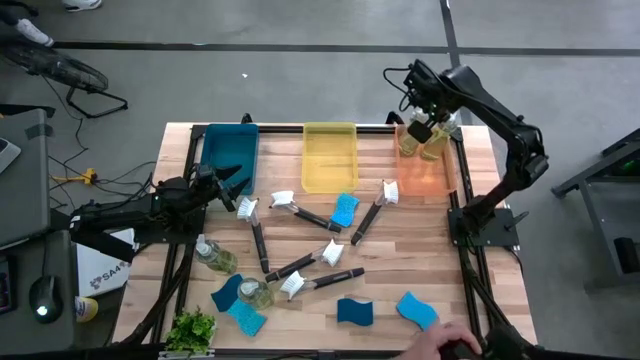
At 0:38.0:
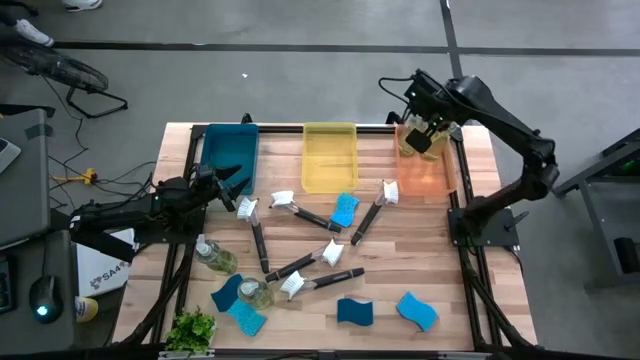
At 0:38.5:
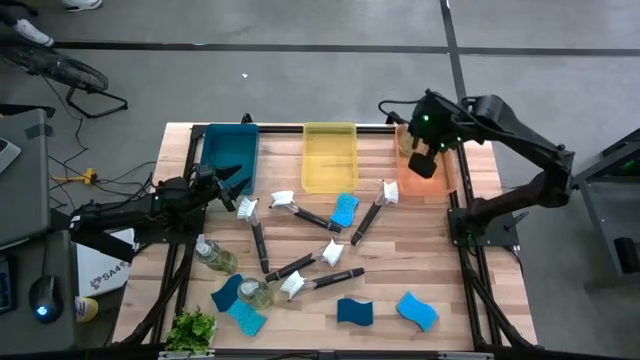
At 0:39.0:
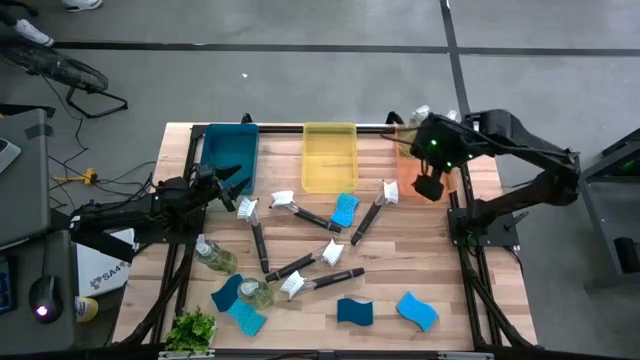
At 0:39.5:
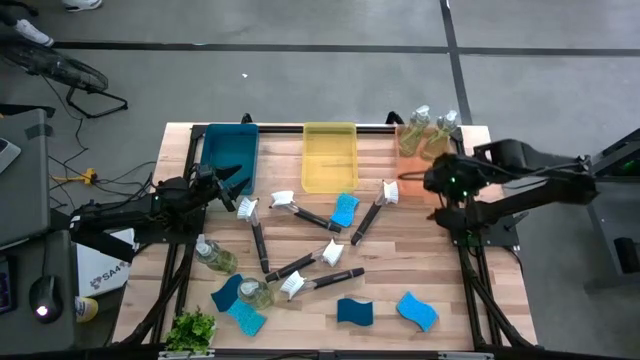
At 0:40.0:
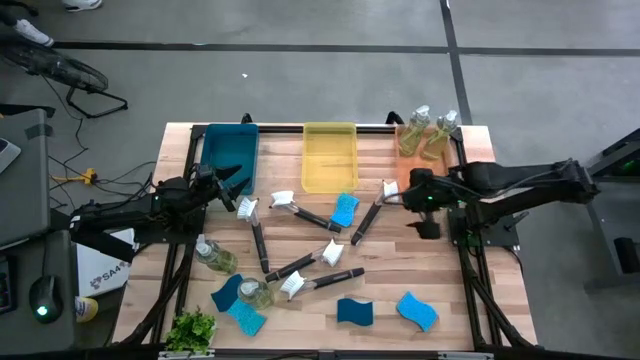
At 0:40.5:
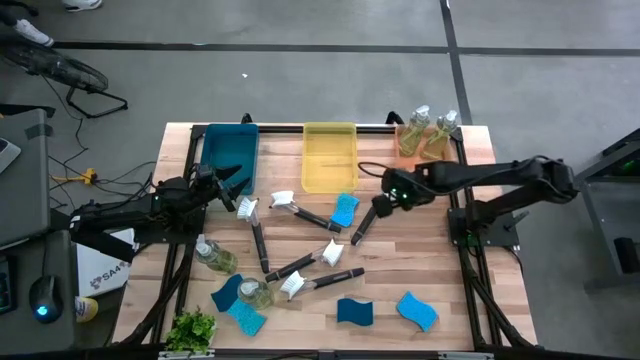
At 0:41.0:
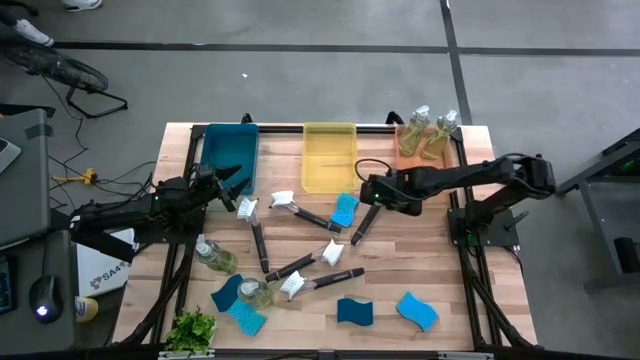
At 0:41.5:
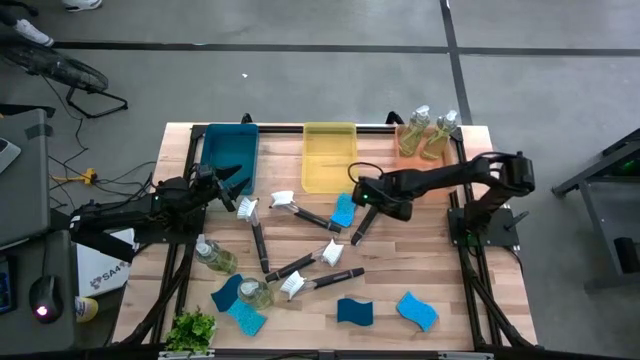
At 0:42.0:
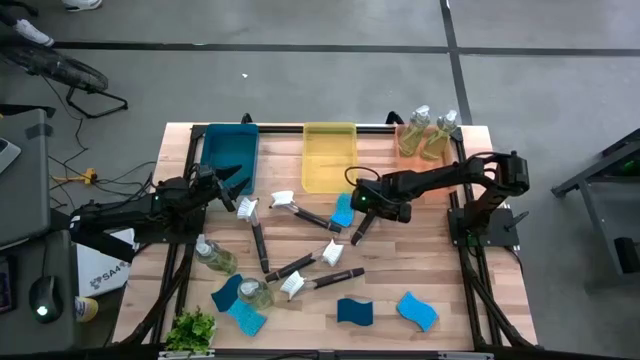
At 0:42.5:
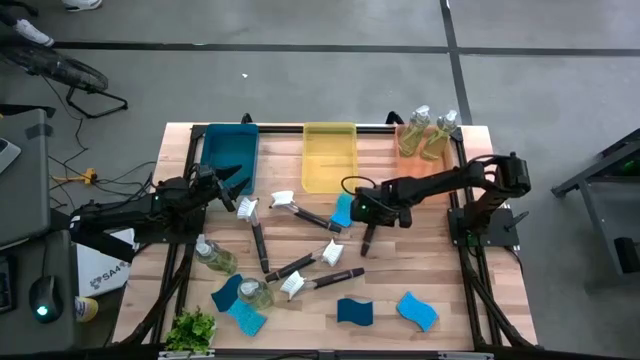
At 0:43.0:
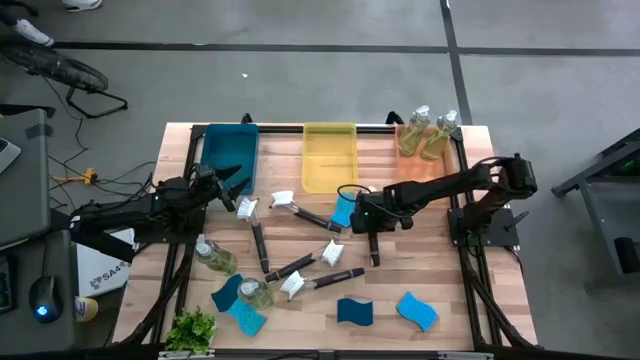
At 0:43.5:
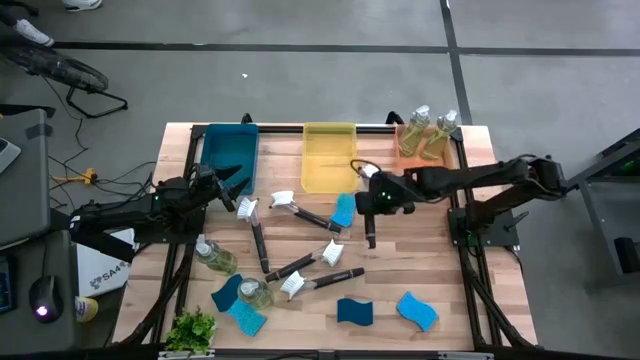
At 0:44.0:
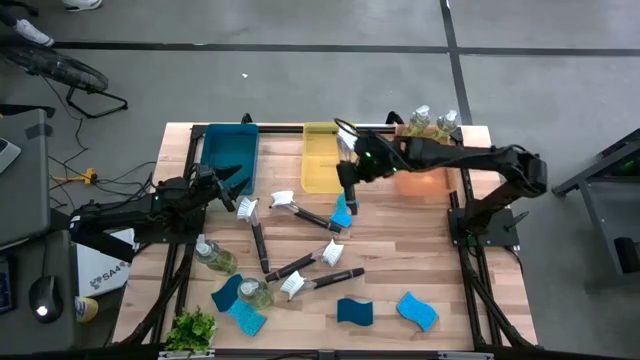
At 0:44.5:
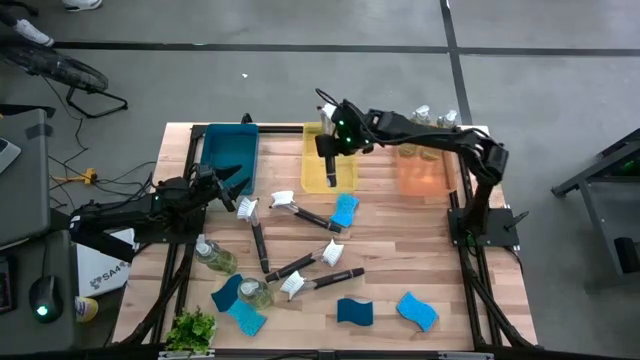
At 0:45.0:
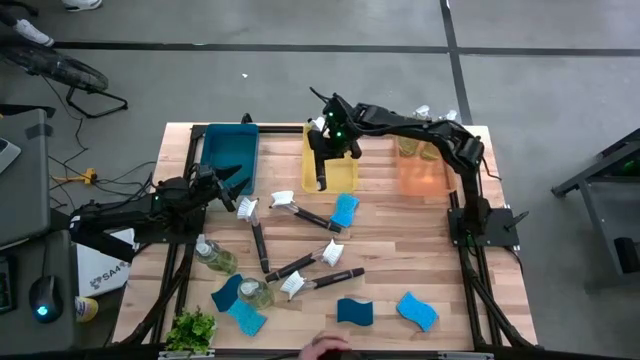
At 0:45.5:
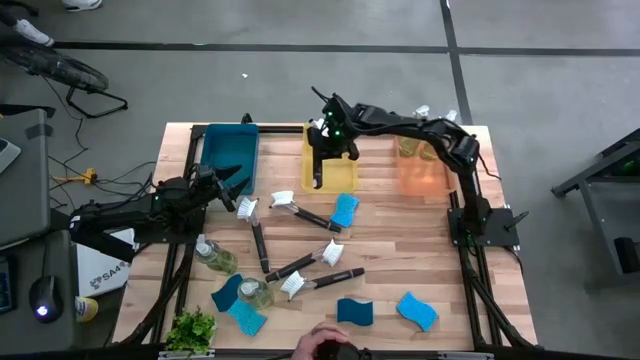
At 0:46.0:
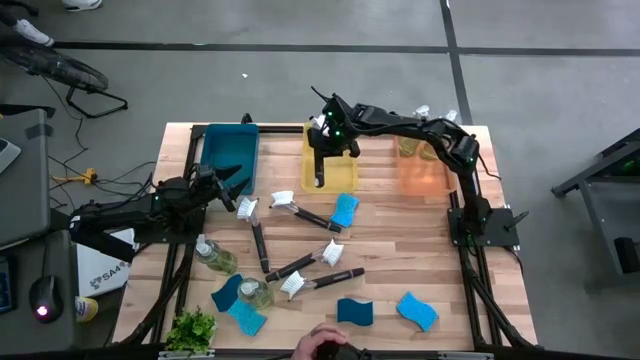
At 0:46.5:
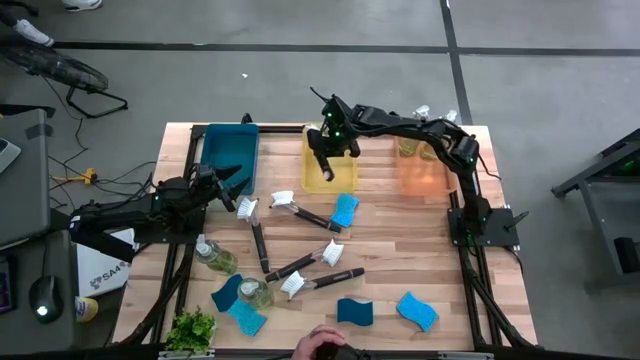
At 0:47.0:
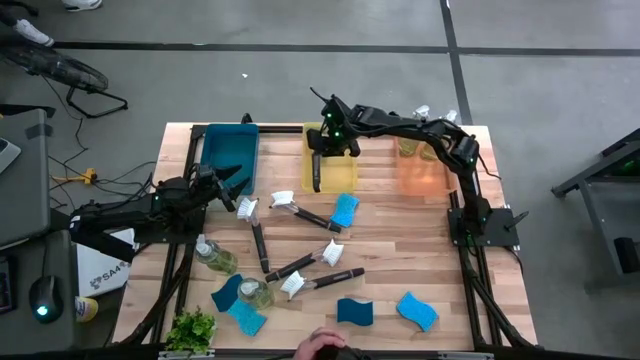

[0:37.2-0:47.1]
Task: Pick & Place Kitchen Sink Supplies
Put the black dishwashing brush into the yellow bin

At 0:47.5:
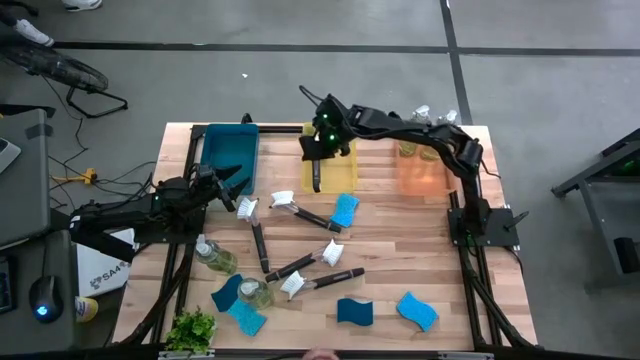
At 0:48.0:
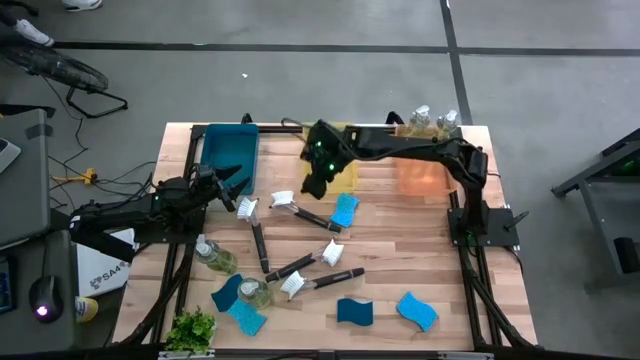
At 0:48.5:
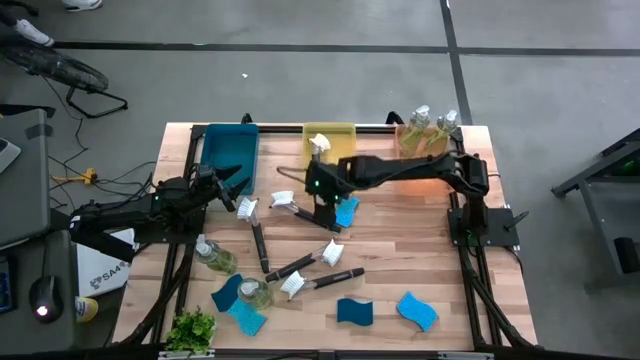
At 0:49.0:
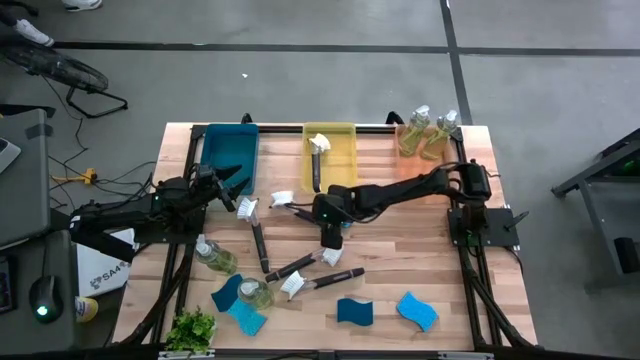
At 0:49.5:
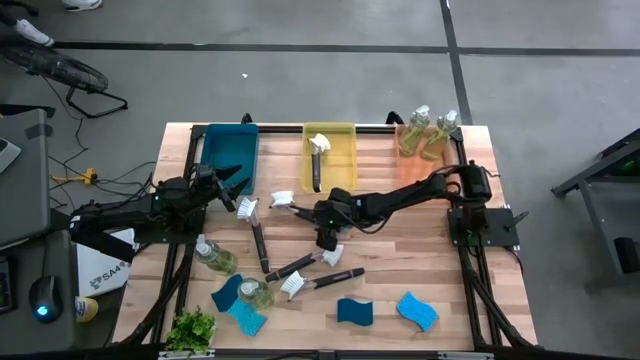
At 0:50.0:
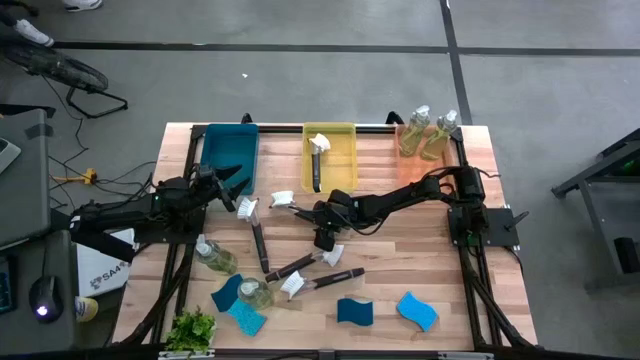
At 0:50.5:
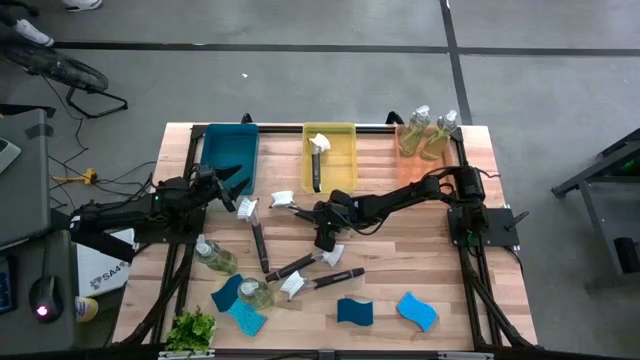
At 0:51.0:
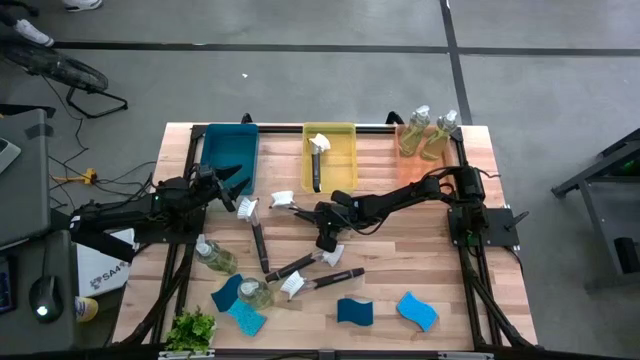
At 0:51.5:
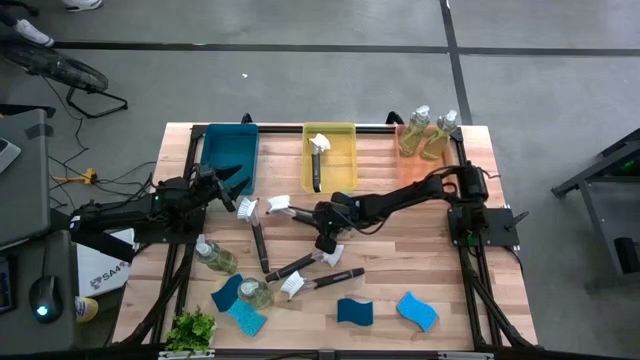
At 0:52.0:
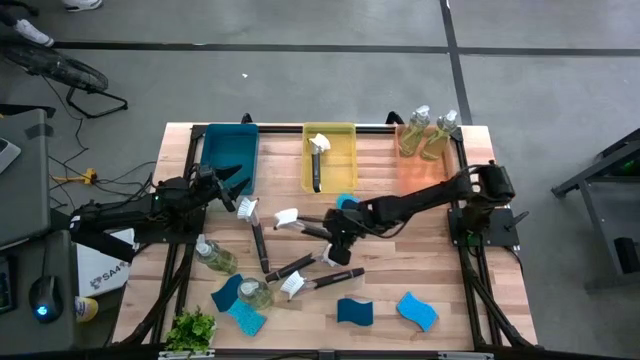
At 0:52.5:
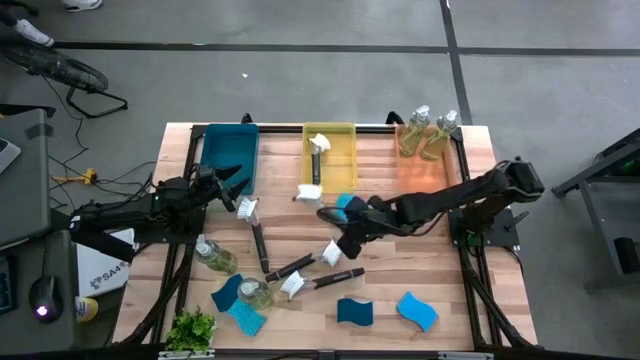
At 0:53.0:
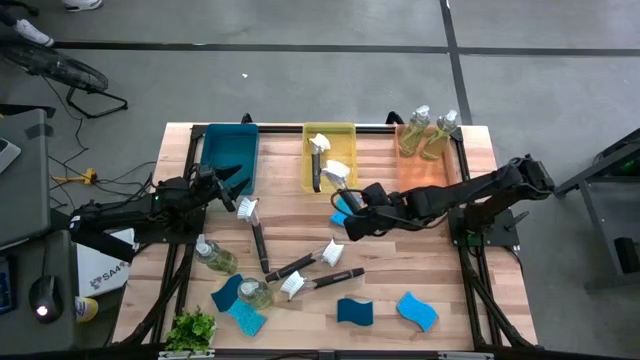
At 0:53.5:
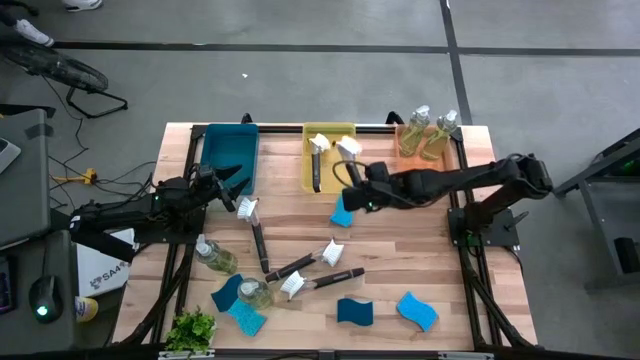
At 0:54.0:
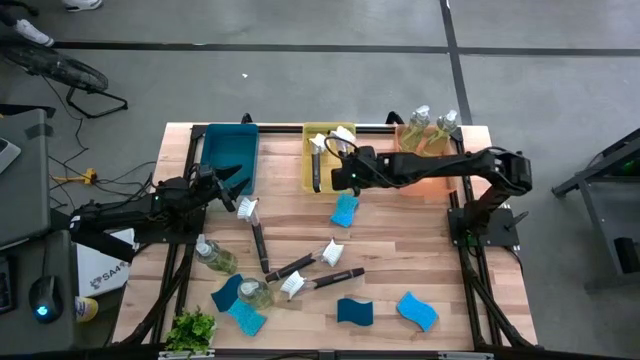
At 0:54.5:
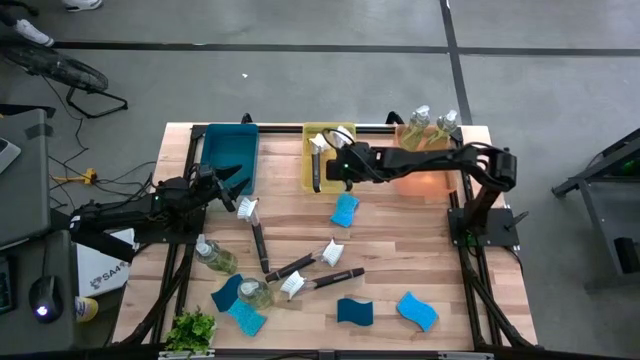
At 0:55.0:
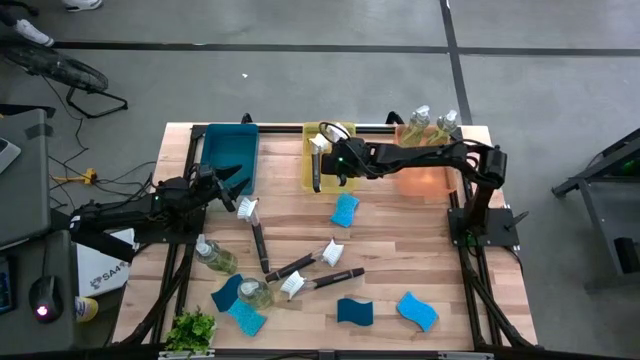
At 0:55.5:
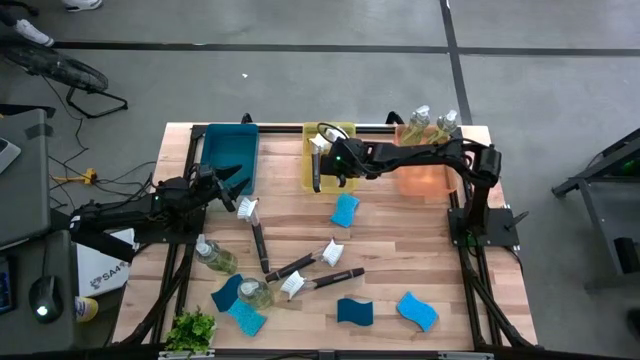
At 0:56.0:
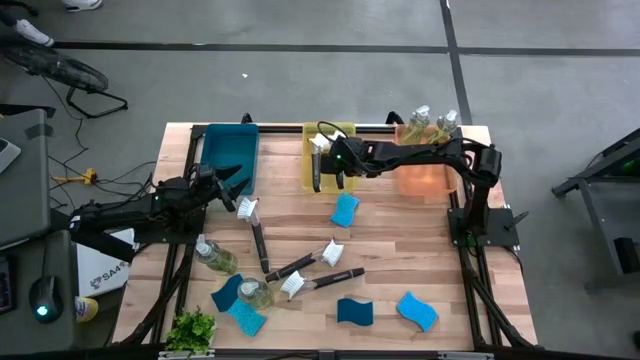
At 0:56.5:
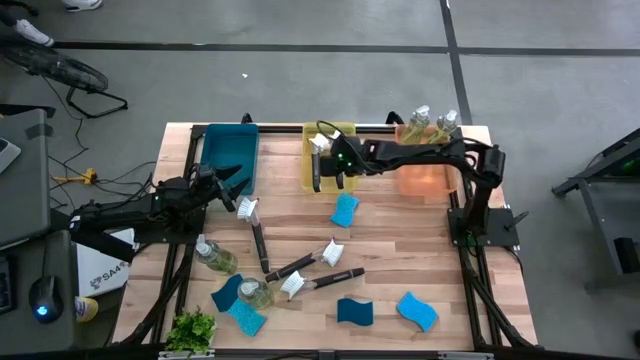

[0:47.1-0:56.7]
Put the black dishwashing brush into the yellow bin
